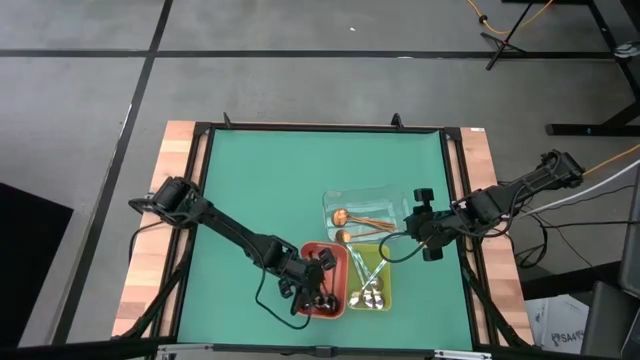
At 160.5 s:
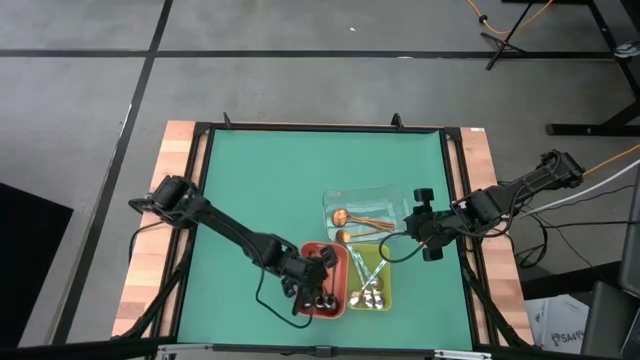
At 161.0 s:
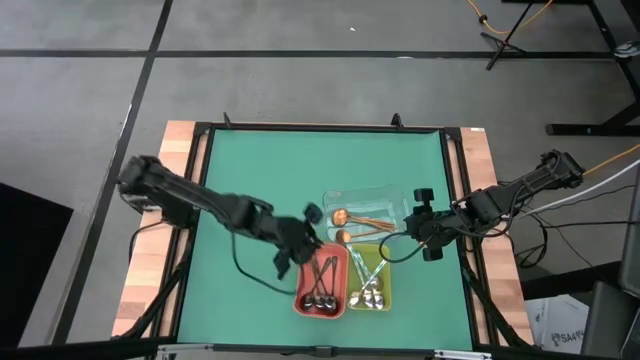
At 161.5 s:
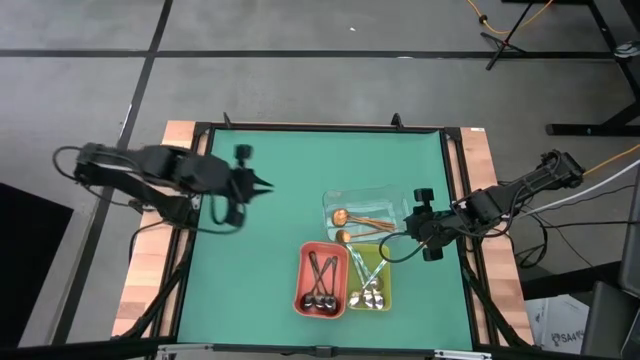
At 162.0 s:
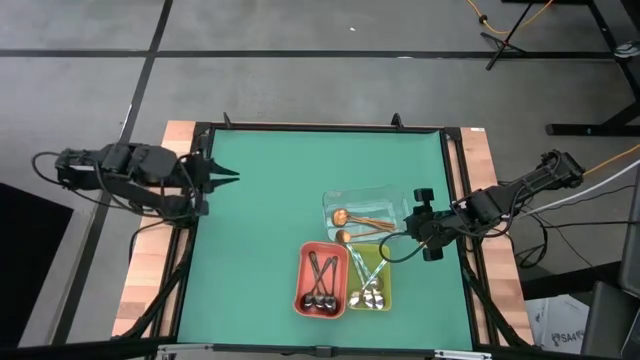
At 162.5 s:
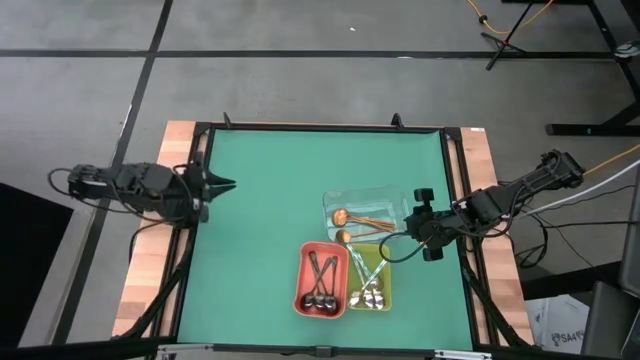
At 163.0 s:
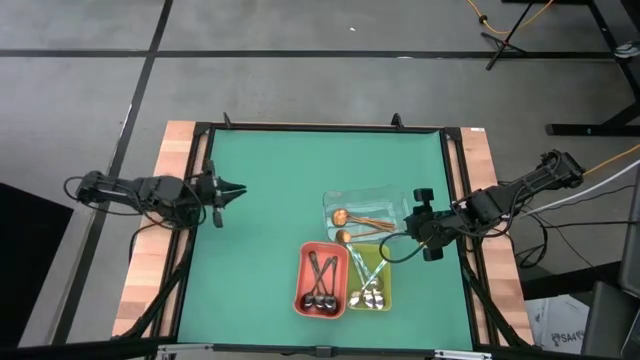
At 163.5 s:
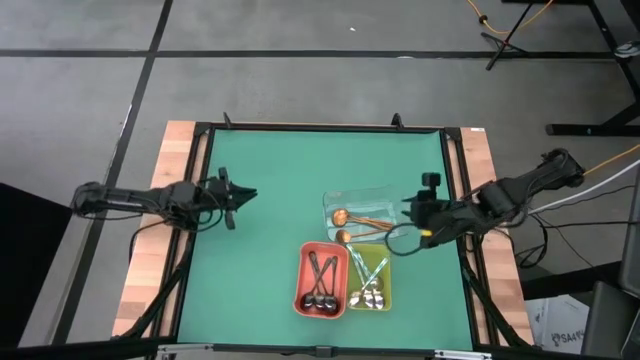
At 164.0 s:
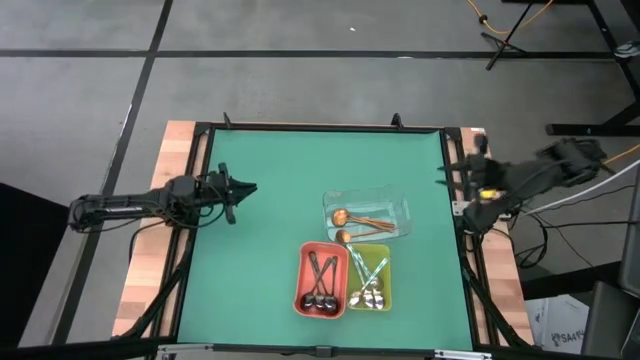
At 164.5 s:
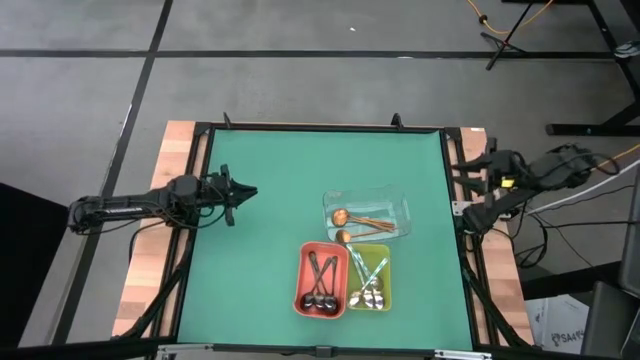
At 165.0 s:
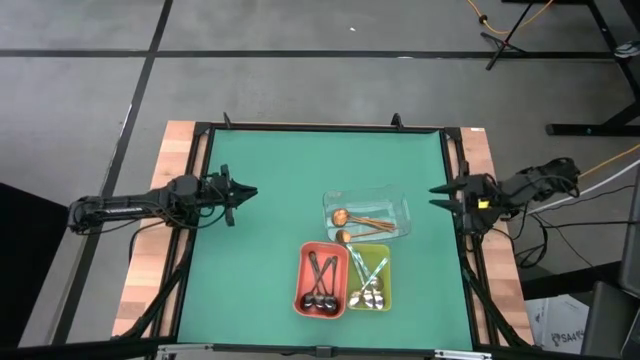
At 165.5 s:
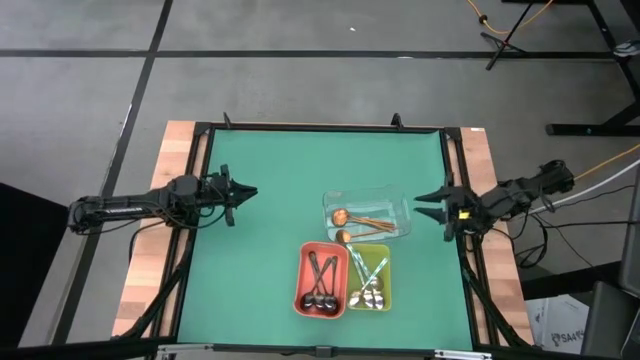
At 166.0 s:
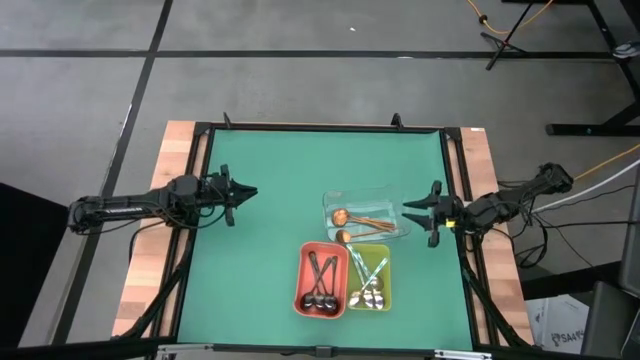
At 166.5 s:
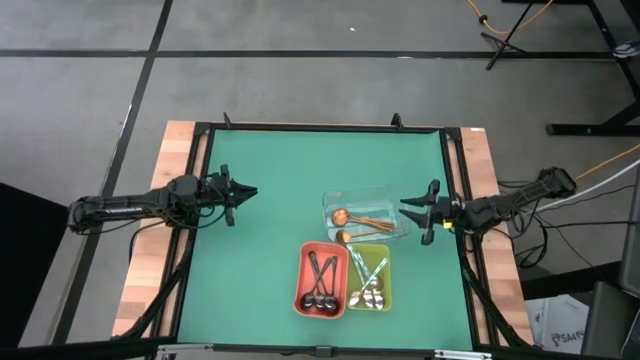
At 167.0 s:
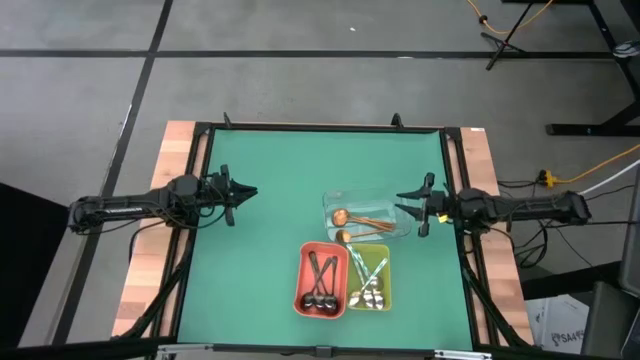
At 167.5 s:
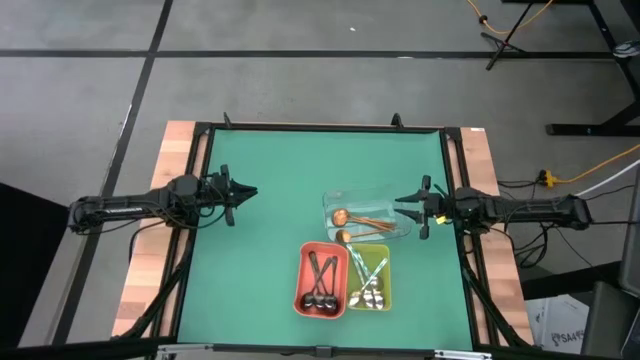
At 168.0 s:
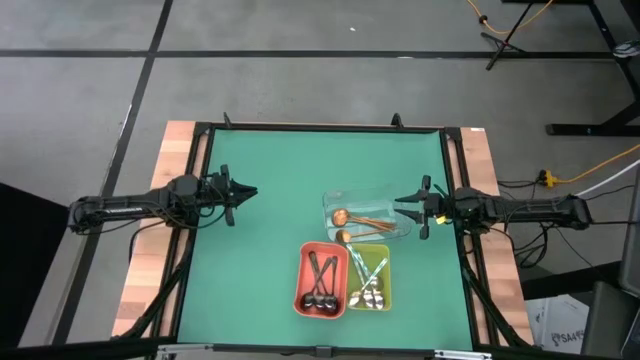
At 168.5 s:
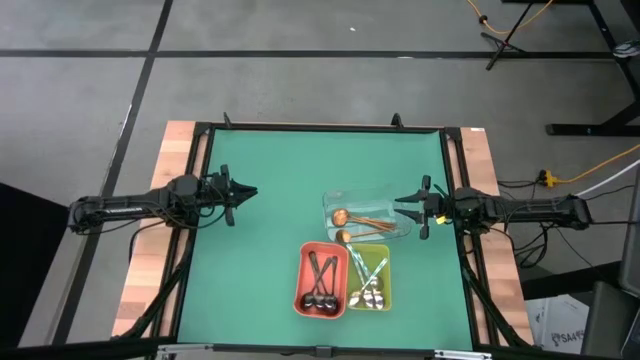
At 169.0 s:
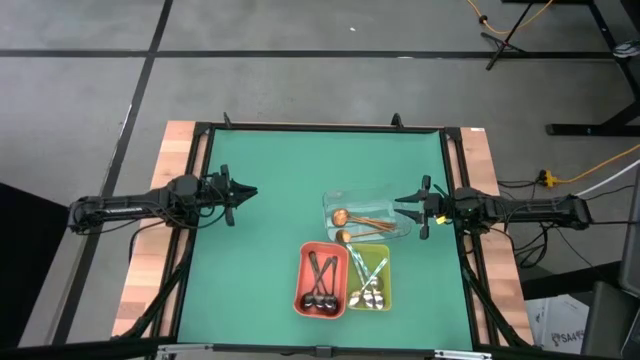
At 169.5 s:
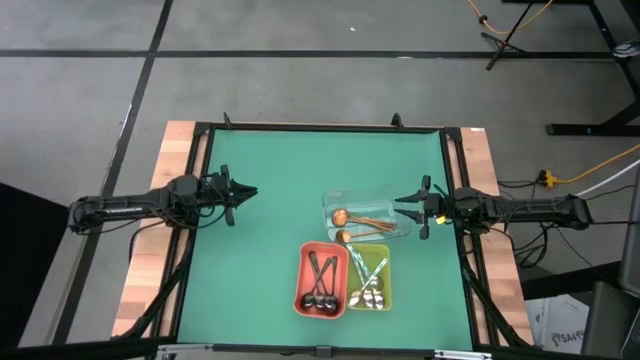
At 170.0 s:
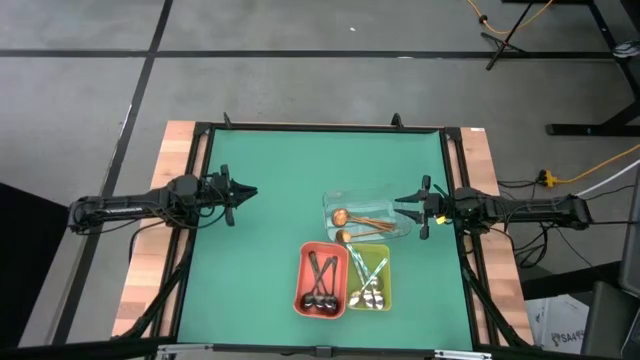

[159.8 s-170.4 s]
Task: Sort silverware by color (type)
Return to Home Position

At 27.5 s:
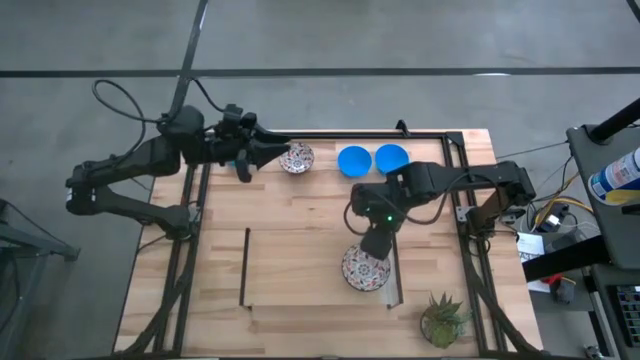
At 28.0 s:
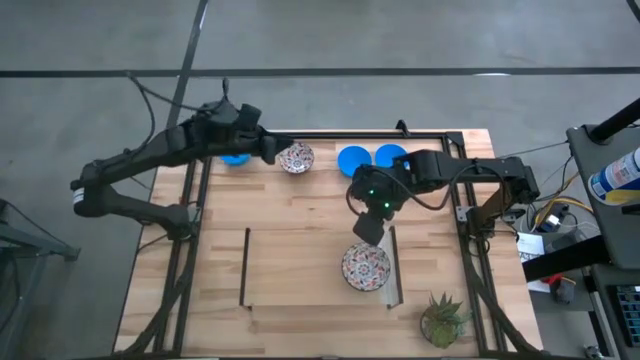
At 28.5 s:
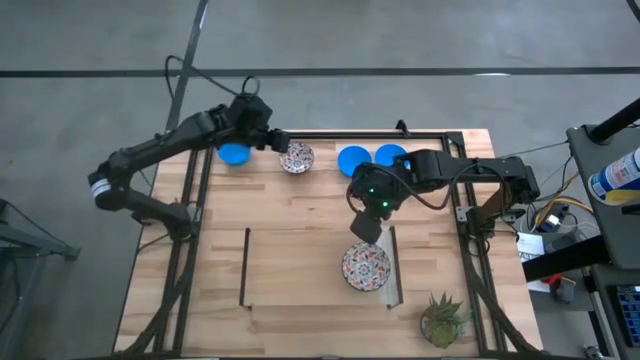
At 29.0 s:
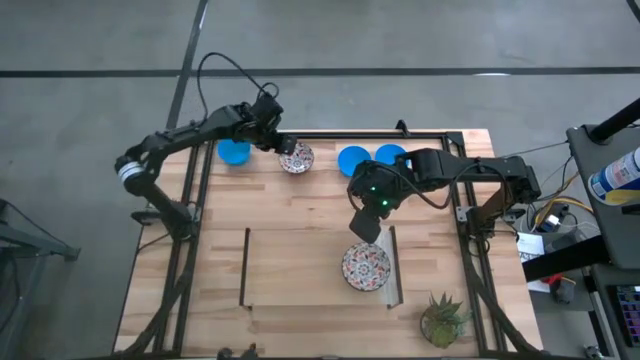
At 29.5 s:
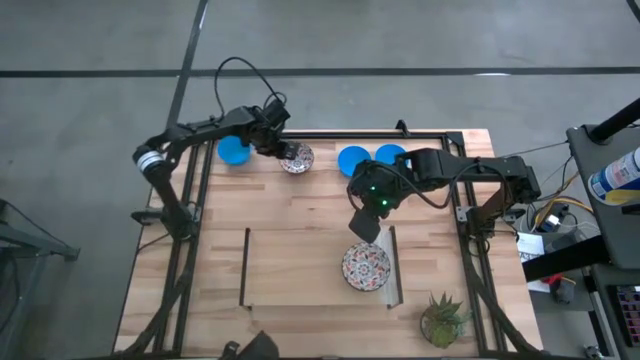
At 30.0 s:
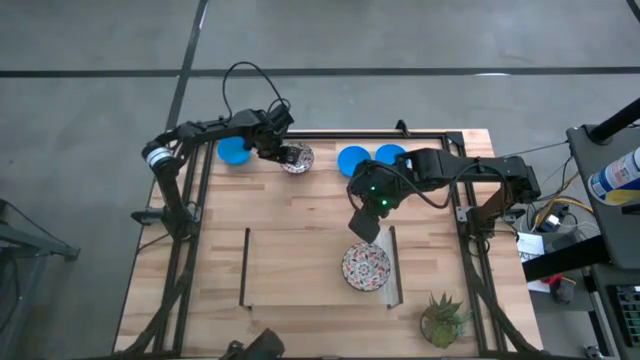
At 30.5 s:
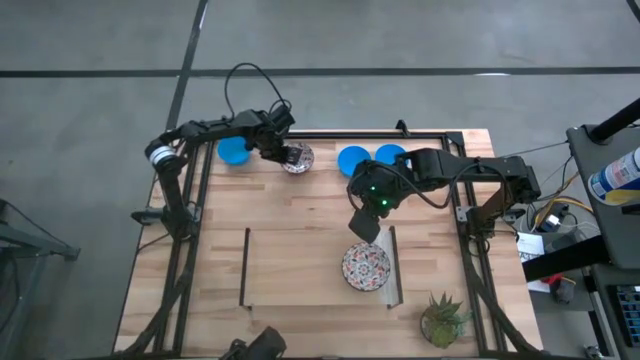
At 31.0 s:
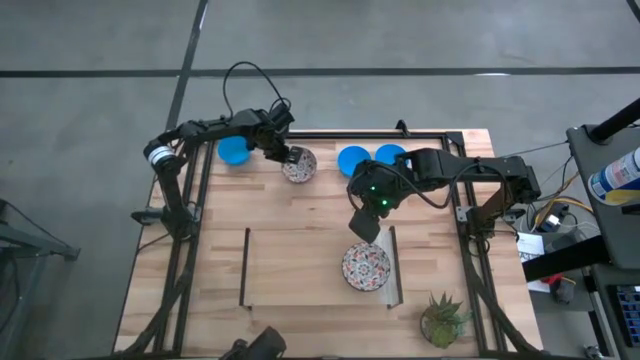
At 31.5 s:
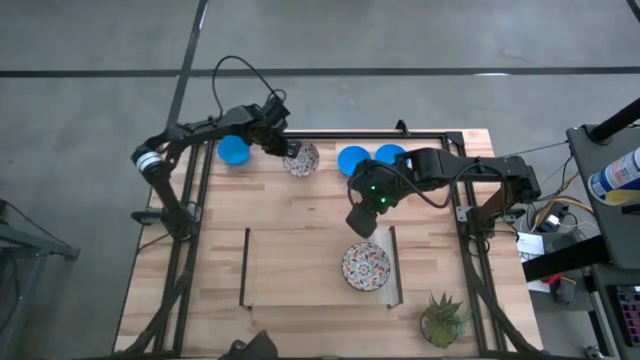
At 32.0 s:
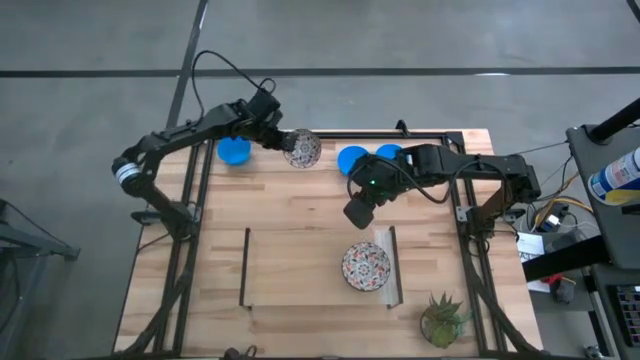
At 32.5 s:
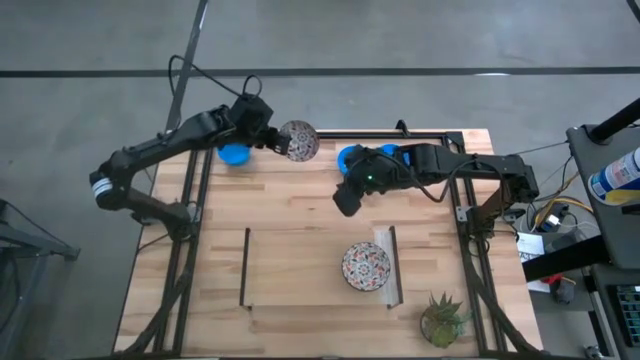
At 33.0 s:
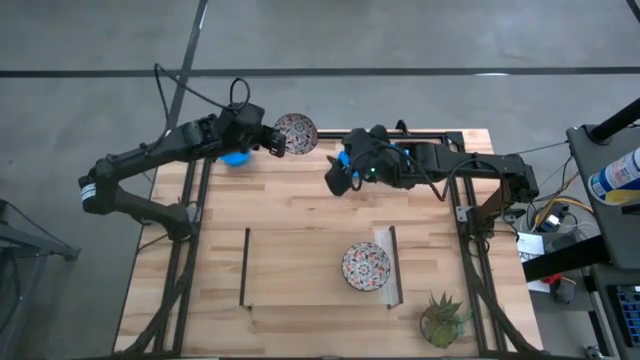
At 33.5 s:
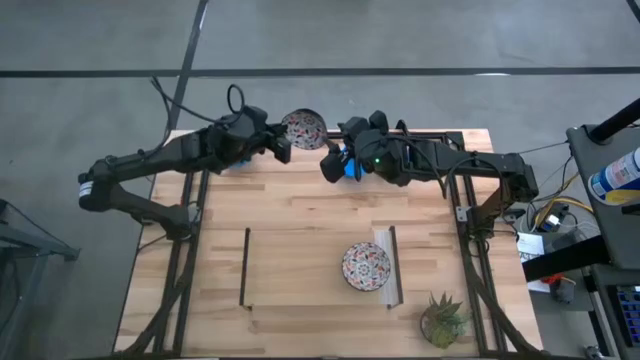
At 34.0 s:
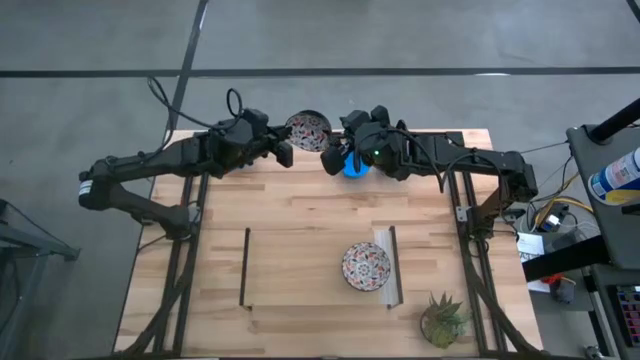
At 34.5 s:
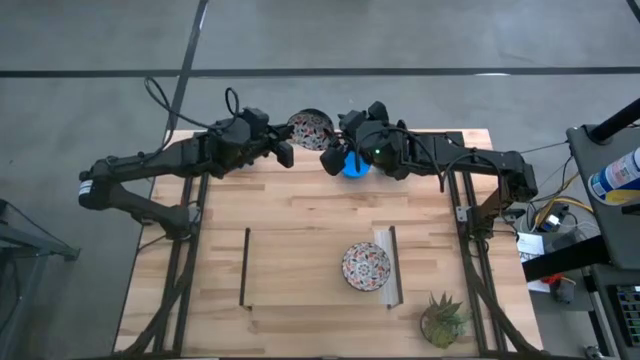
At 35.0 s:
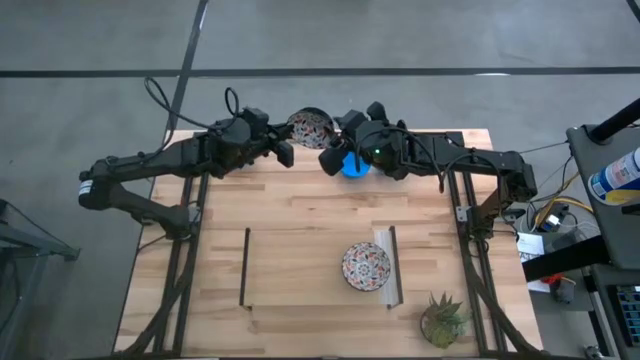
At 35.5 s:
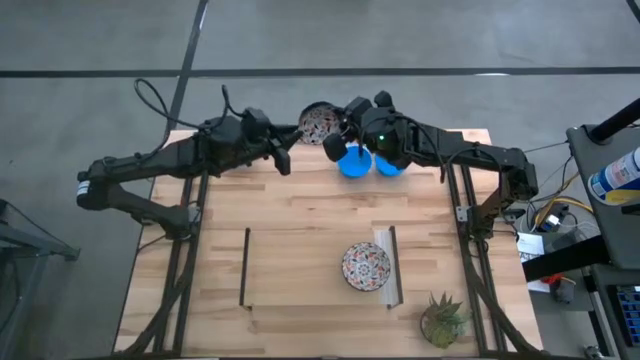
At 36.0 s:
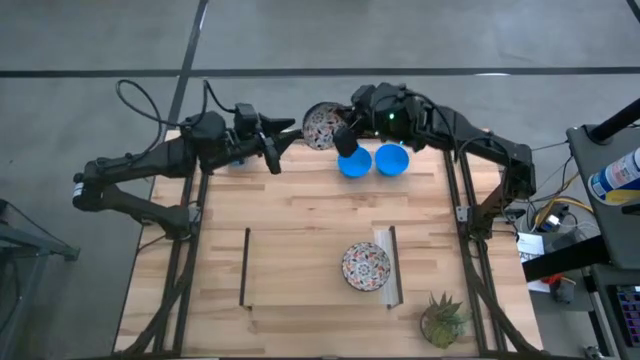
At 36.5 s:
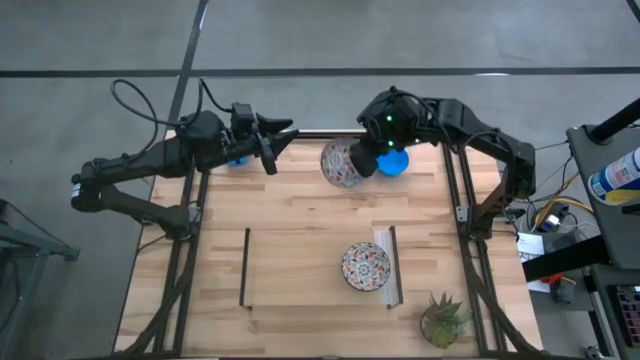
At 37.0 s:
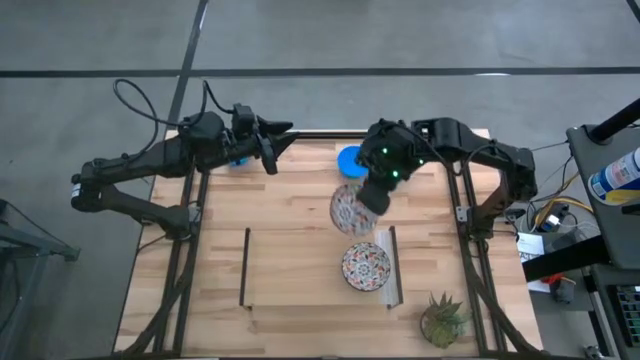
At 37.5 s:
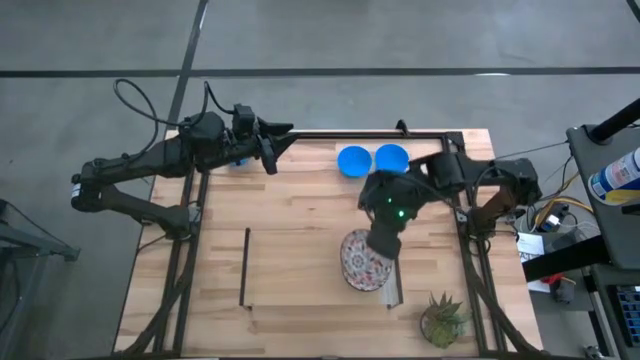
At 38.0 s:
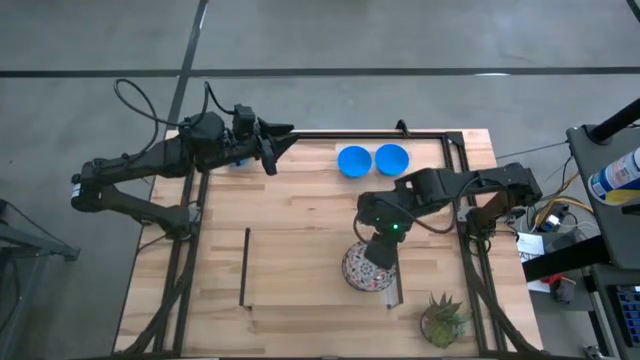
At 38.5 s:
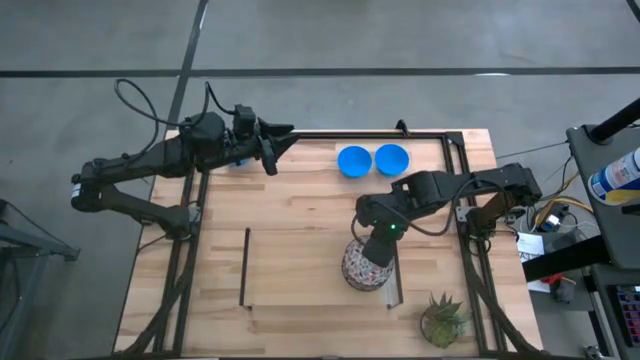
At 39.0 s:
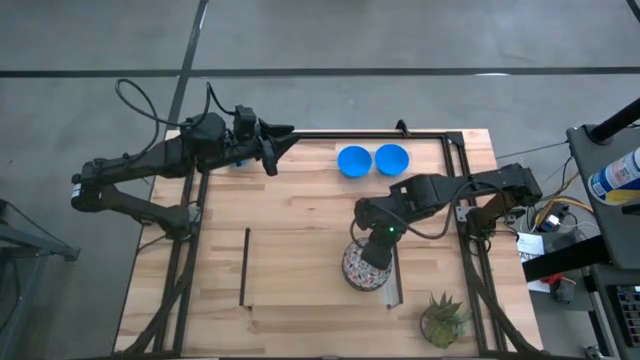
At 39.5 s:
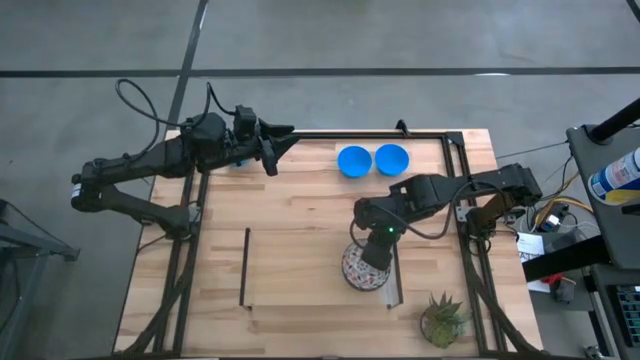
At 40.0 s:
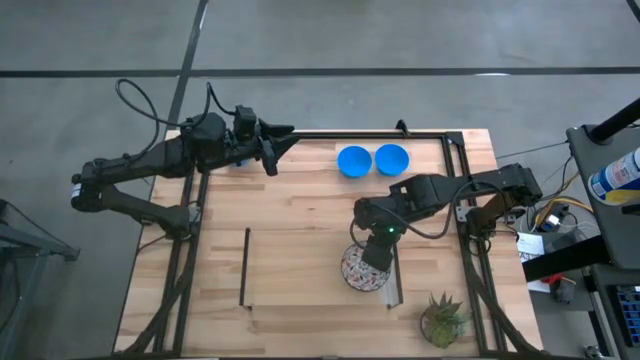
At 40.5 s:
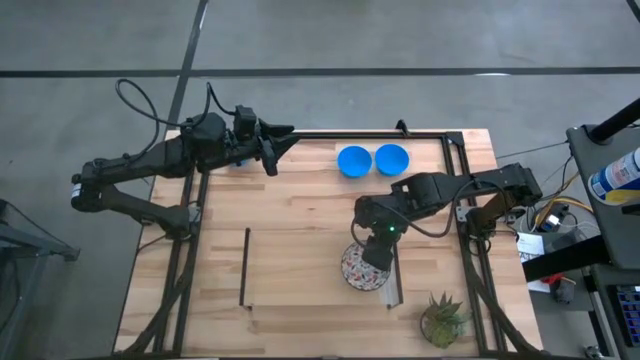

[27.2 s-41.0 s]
Task: Pick & Place Mini bowls
Stack the white patterned bowl on top of the other white patterned bowls on the shelf
